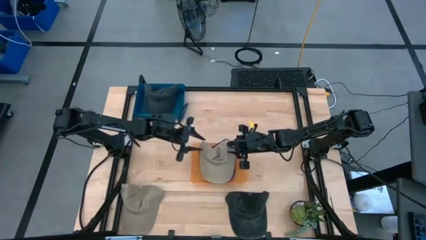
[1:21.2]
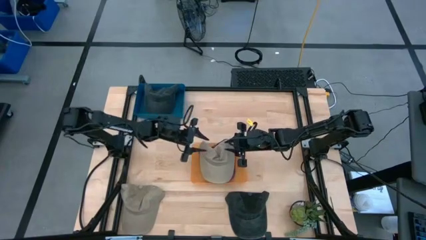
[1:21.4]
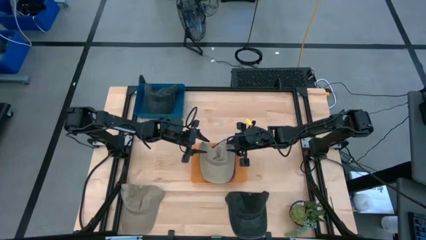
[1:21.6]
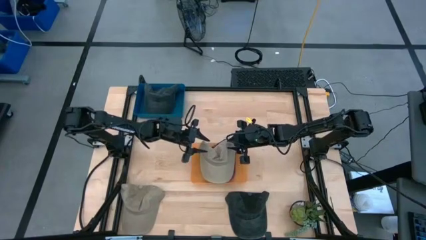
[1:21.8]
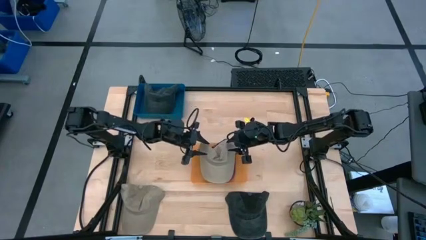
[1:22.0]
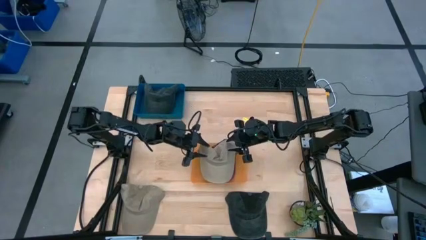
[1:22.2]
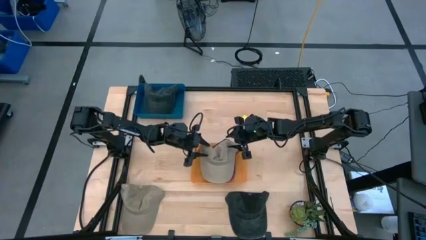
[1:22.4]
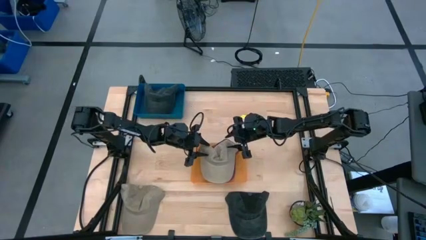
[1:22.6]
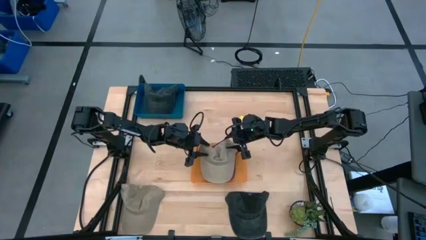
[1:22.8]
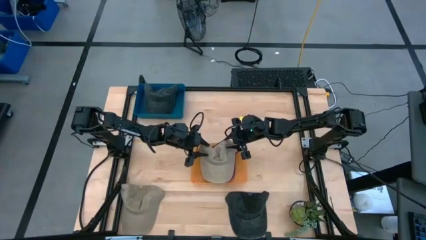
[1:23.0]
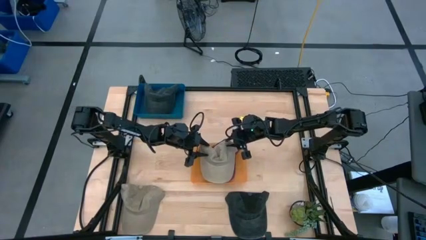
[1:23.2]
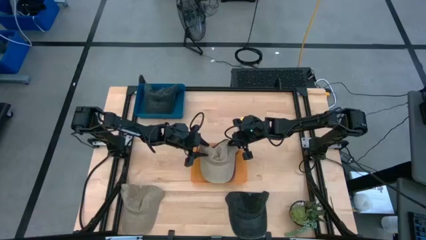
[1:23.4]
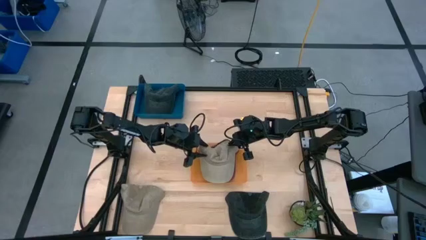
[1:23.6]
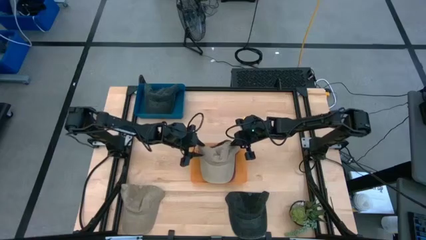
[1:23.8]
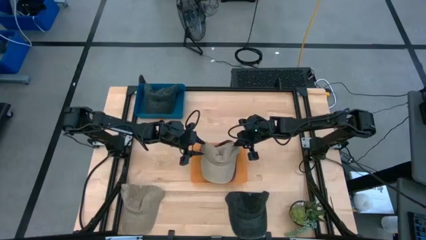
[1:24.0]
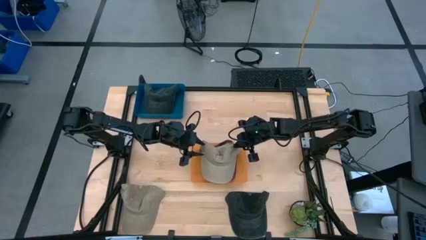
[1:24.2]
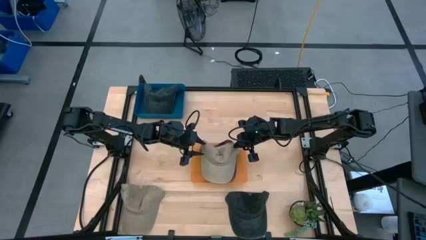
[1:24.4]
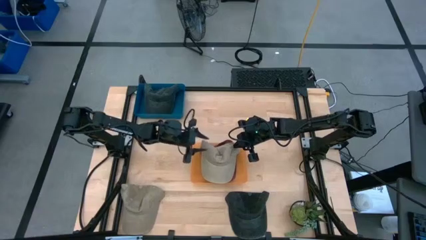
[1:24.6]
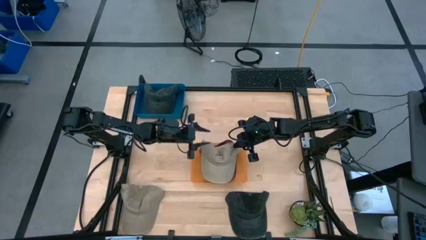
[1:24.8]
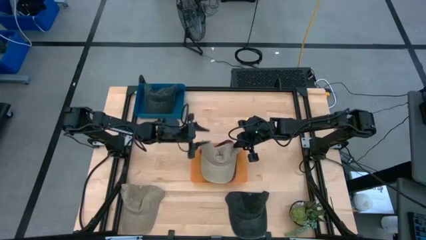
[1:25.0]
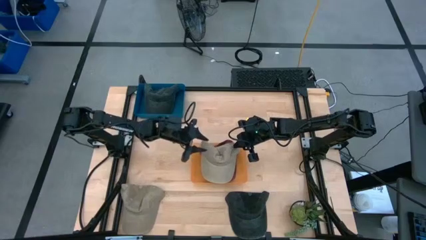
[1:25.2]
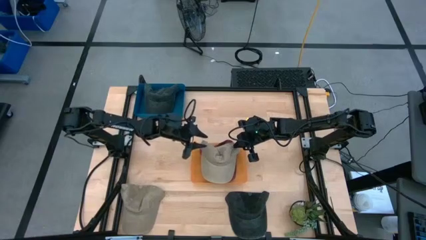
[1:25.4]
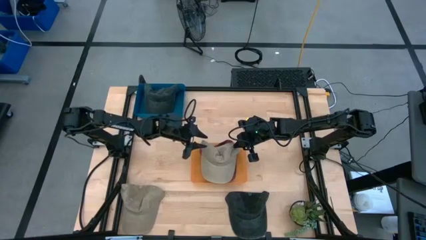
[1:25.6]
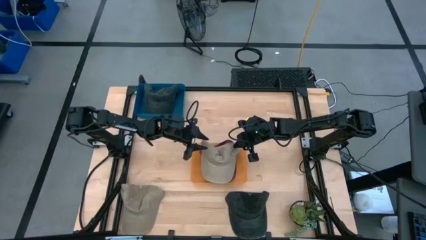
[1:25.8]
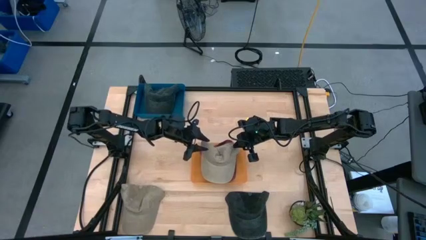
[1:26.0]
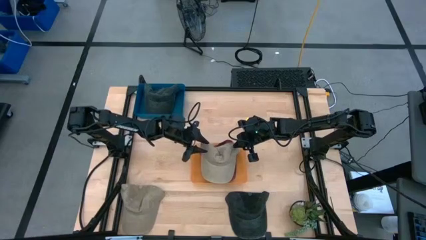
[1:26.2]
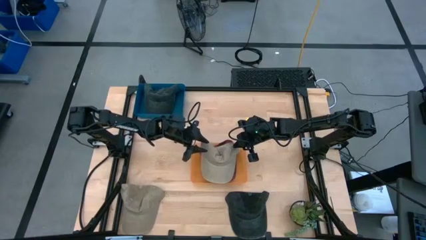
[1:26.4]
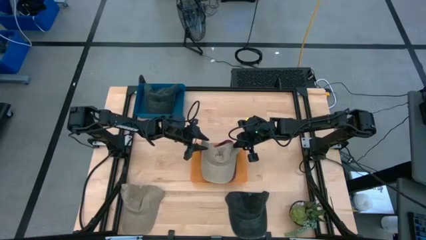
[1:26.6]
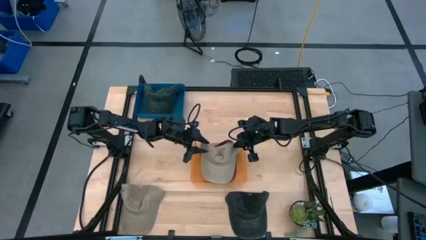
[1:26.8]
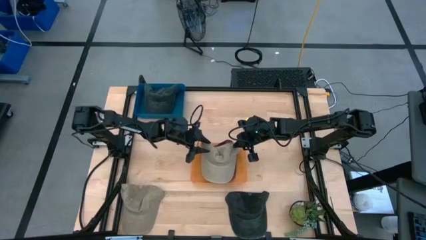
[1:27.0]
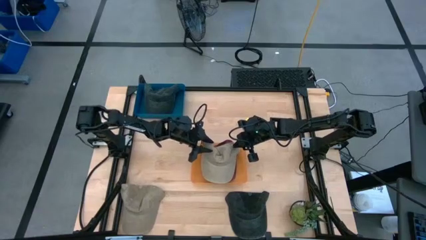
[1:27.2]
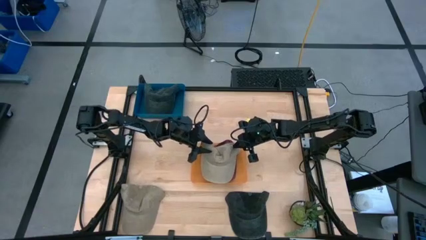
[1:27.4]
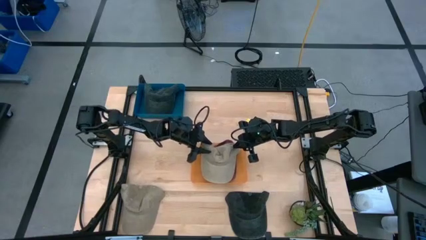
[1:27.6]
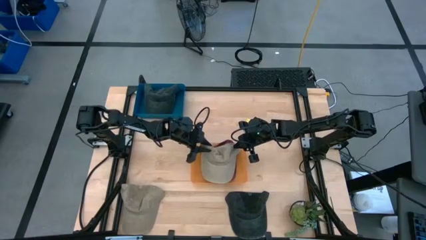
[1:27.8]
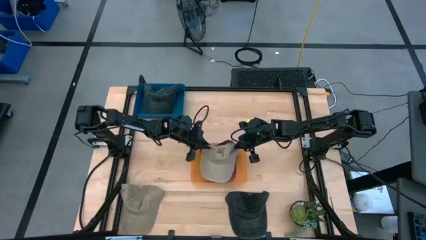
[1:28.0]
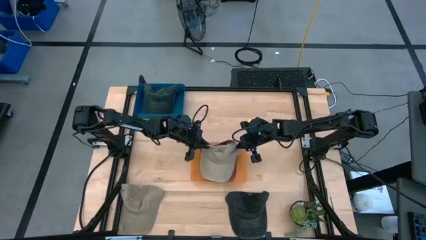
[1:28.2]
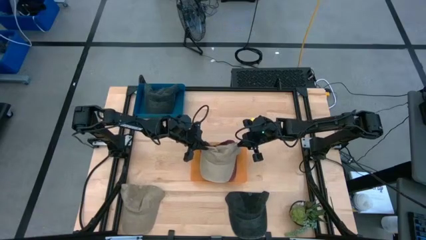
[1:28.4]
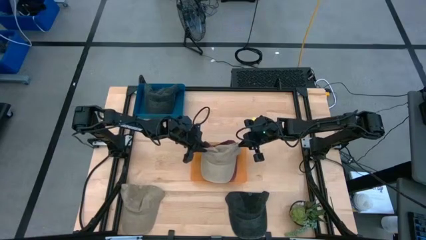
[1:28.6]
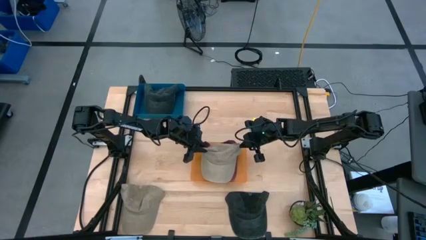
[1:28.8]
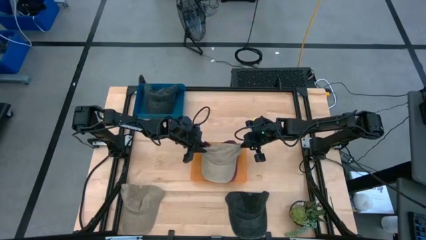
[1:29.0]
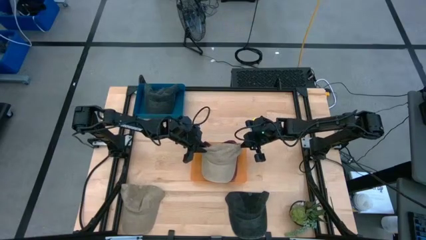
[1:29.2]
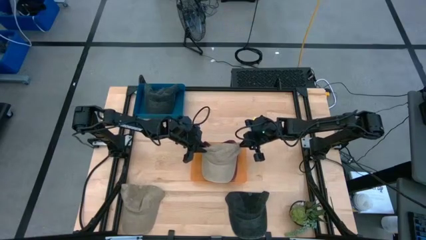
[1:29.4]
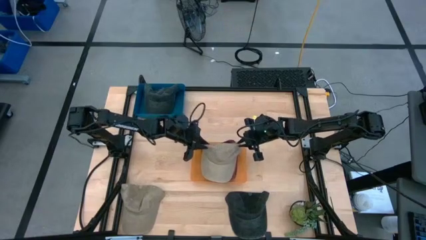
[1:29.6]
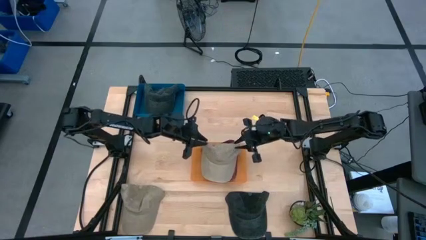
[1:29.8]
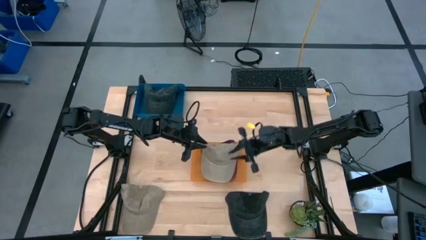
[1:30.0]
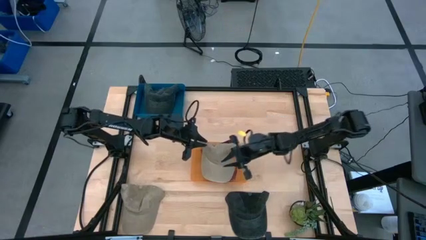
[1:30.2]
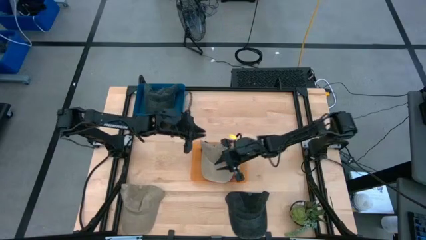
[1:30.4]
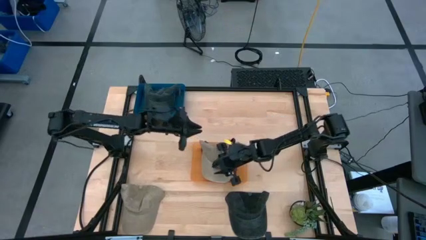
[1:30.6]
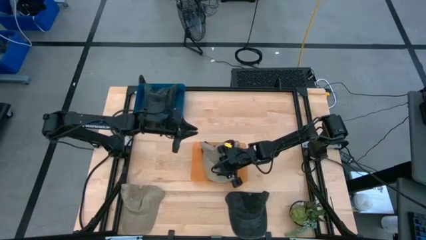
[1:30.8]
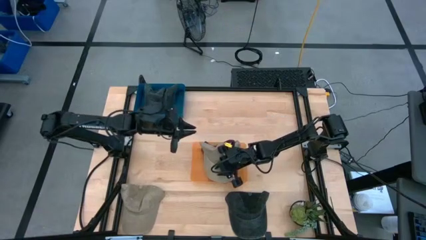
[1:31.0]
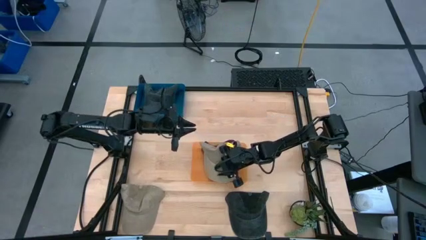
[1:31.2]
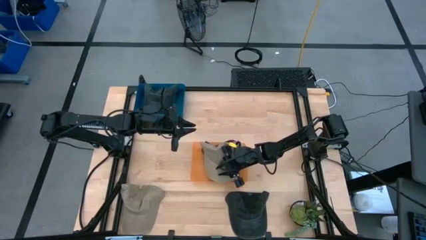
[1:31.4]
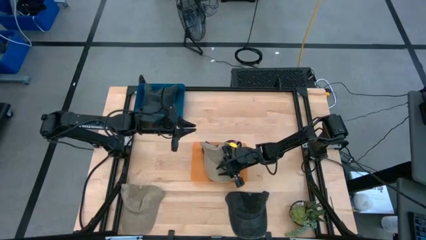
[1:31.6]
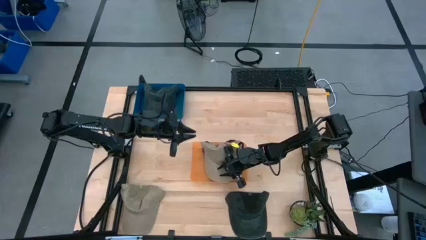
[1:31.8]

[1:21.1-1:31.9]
Task: Pick & Place hat
Put the top brown cap into the orange bin

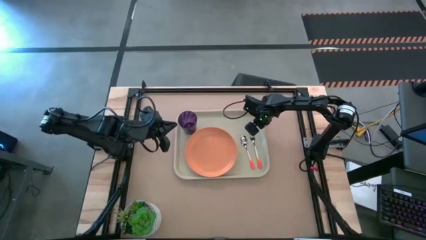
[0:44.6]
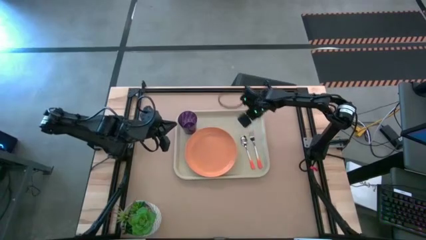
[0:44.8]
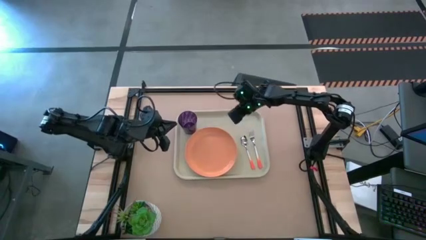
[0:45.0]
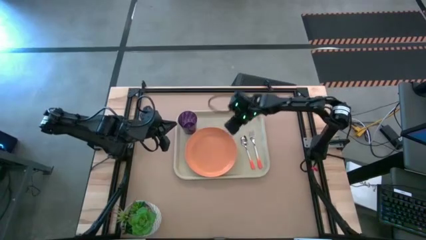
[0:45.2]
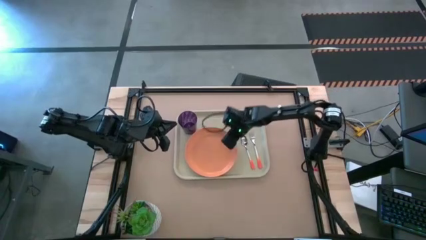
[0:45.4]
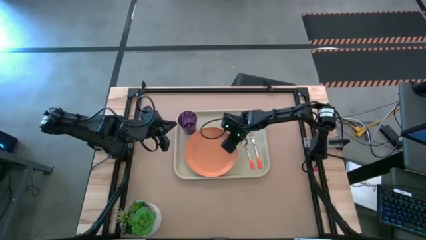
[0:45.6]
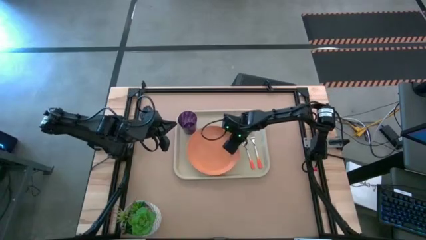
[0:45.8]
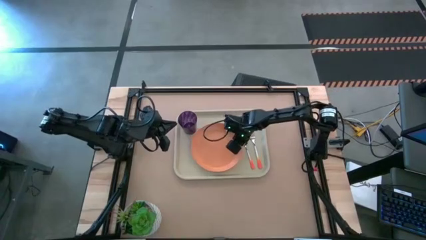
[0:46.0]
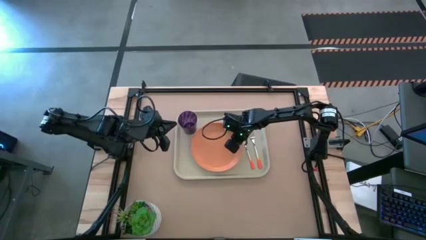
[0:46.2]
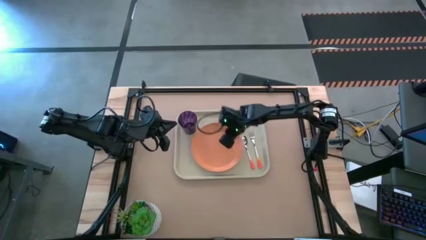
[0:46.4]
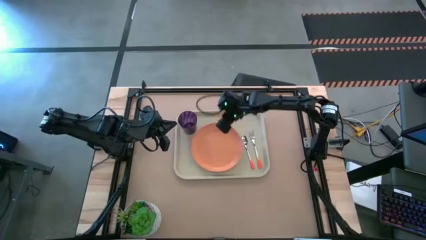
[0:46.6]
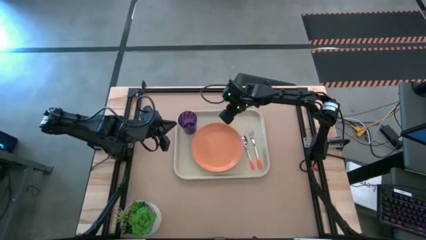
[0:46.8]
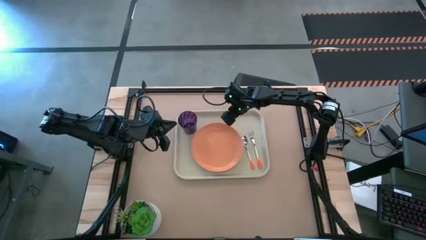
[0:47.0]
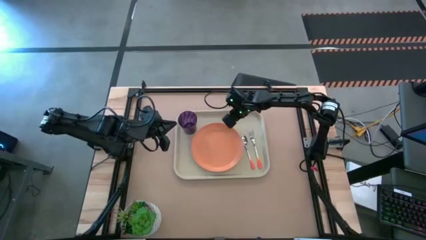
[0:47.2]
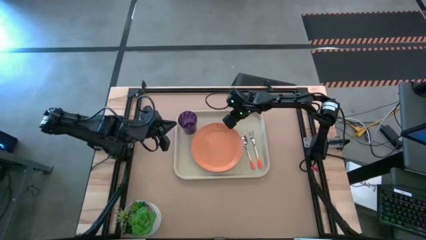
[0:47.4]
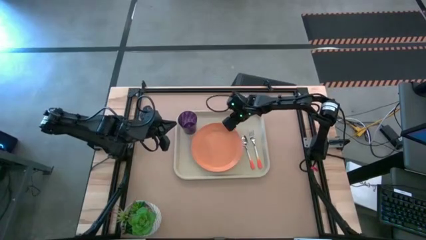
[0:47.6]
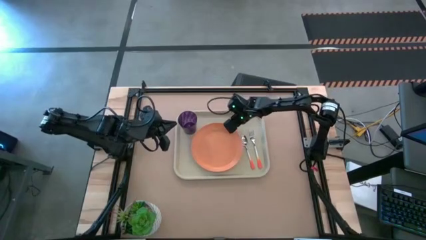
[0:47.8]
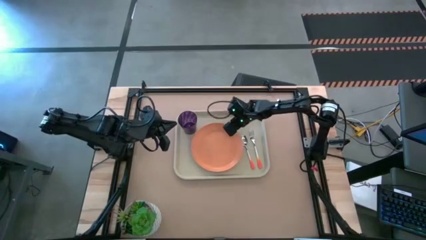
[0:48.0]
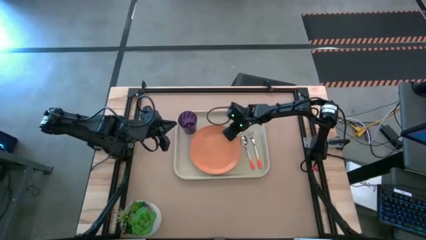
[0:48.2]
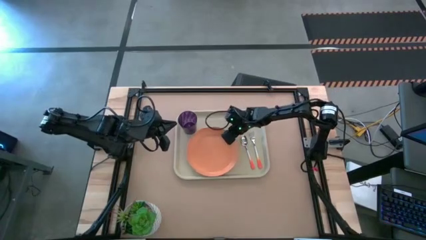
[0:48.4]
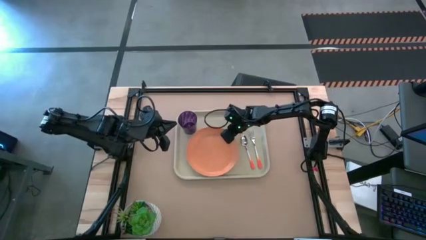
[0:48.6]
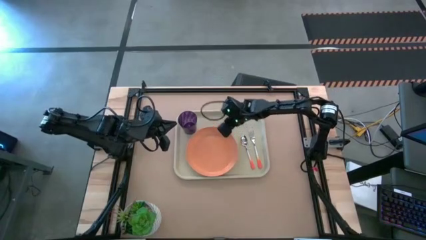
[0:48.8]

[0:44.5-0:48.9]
Task: Pick and place plate/cup/fork/spoon on tray
Adjust the orange plate on the white tray
